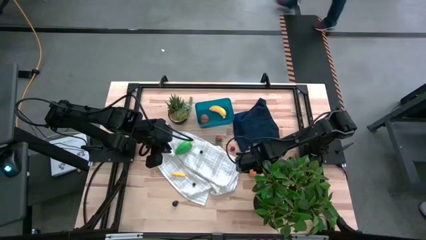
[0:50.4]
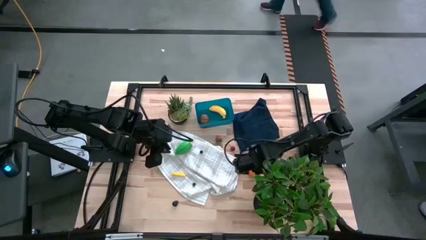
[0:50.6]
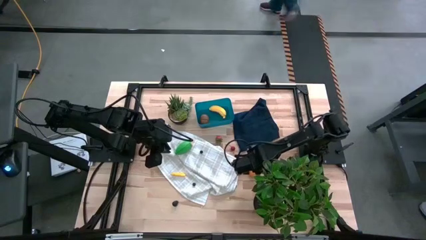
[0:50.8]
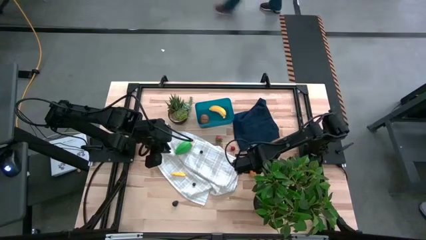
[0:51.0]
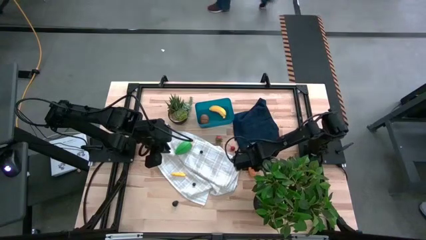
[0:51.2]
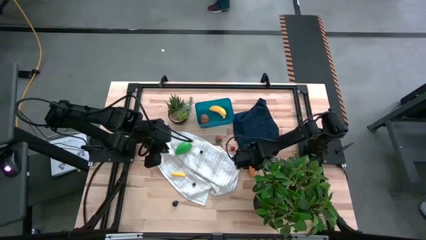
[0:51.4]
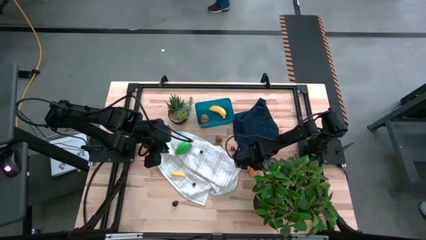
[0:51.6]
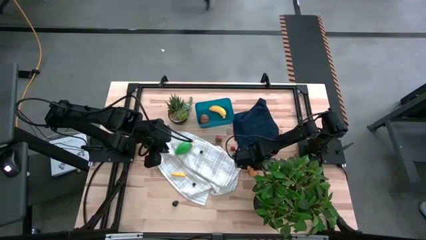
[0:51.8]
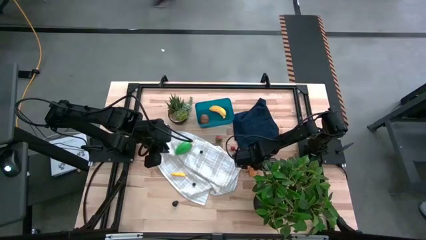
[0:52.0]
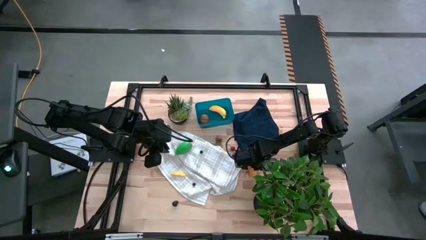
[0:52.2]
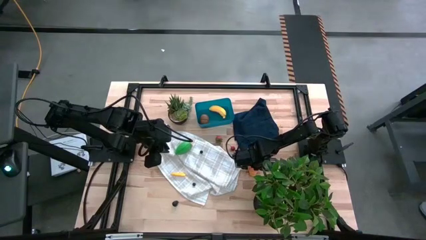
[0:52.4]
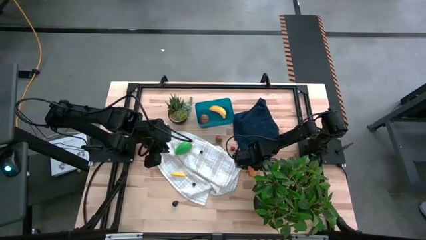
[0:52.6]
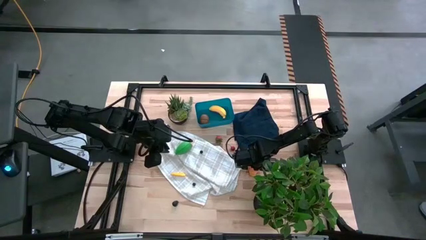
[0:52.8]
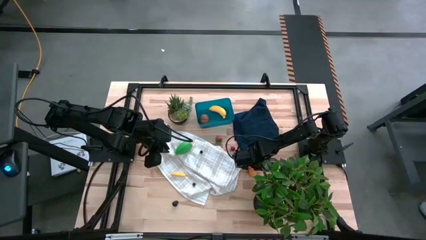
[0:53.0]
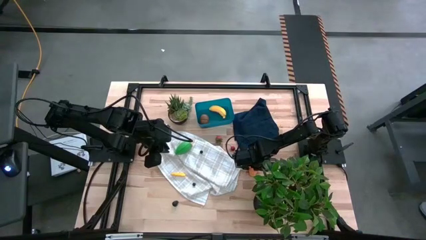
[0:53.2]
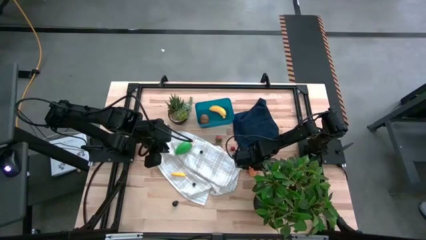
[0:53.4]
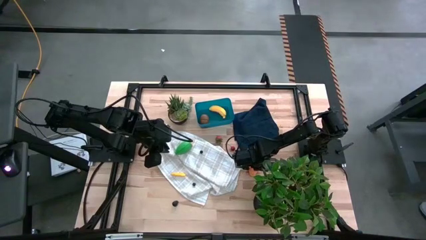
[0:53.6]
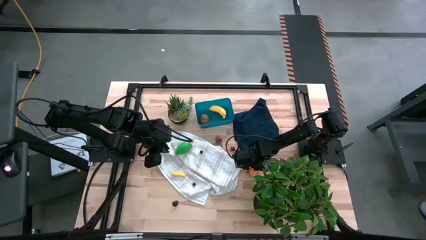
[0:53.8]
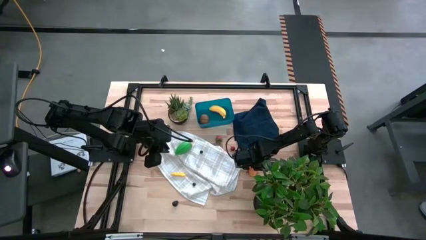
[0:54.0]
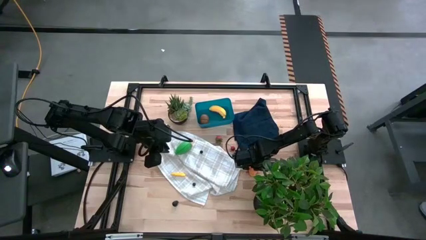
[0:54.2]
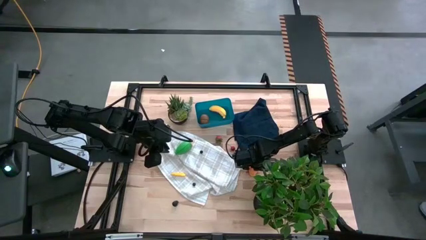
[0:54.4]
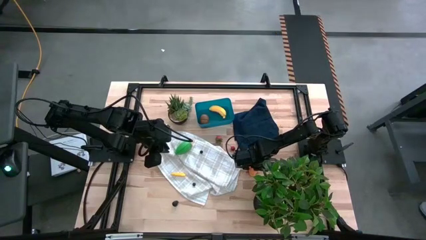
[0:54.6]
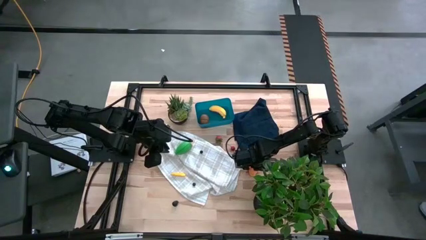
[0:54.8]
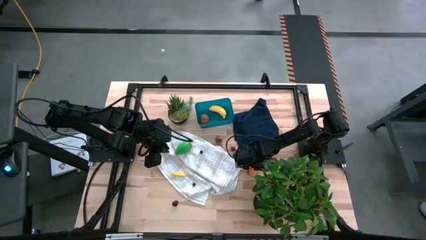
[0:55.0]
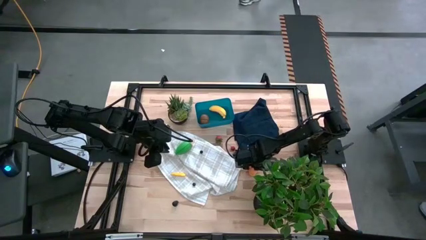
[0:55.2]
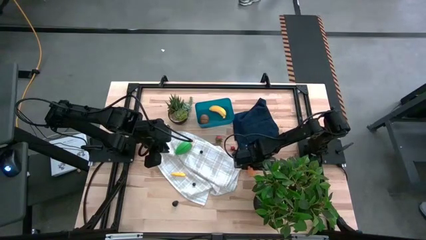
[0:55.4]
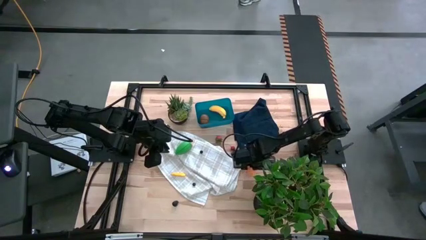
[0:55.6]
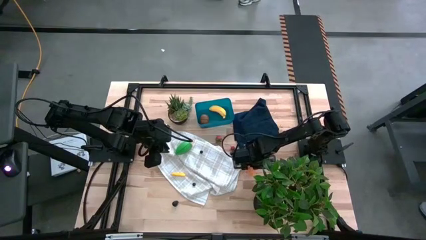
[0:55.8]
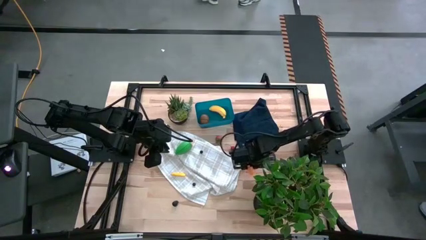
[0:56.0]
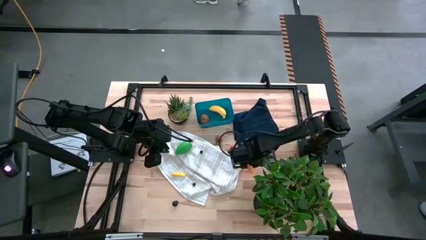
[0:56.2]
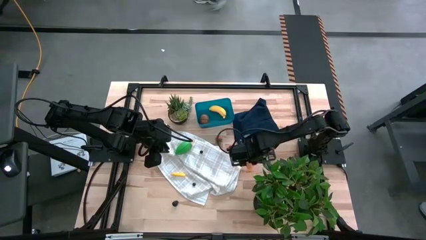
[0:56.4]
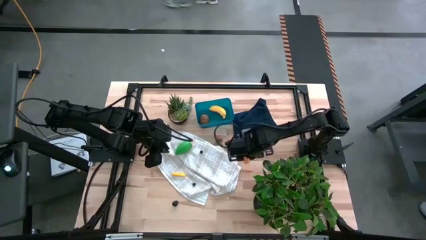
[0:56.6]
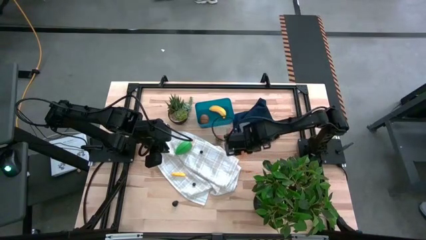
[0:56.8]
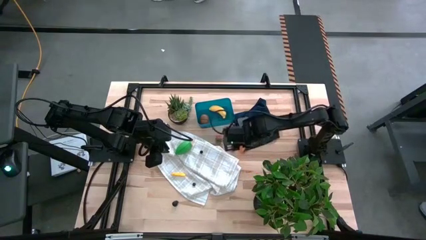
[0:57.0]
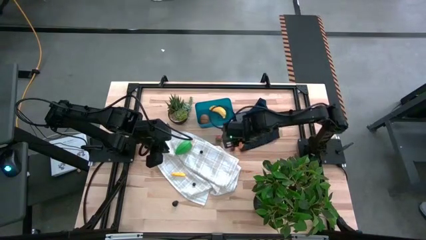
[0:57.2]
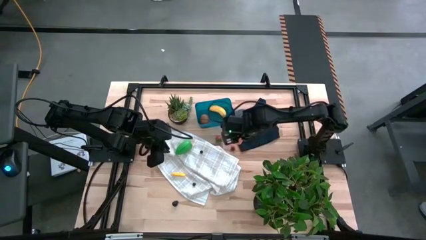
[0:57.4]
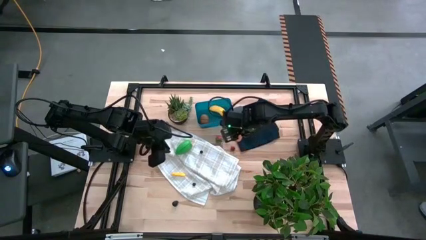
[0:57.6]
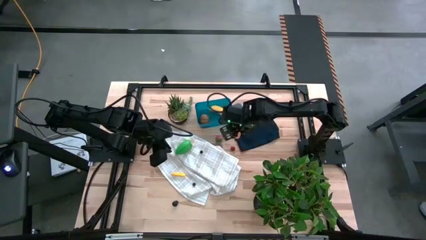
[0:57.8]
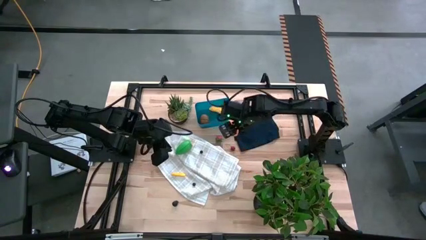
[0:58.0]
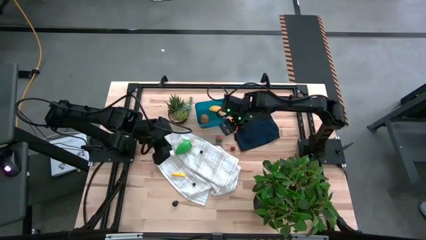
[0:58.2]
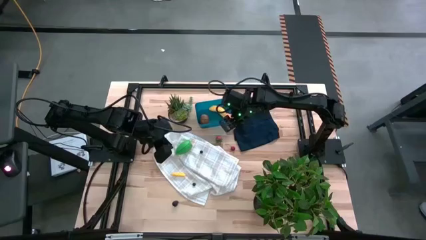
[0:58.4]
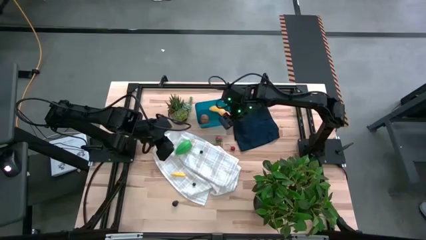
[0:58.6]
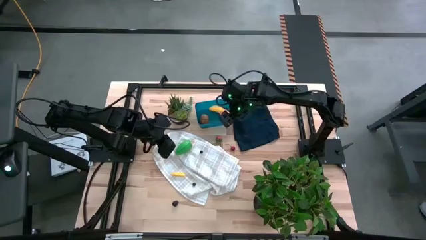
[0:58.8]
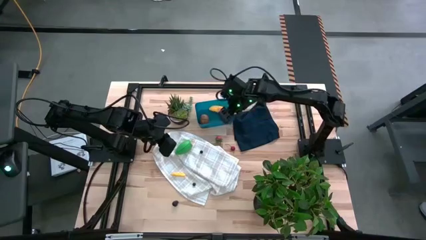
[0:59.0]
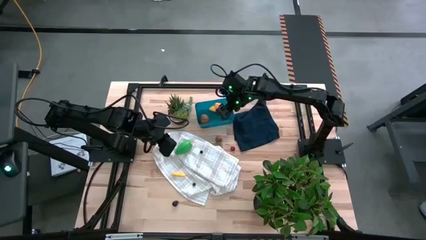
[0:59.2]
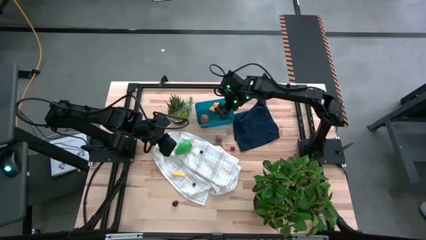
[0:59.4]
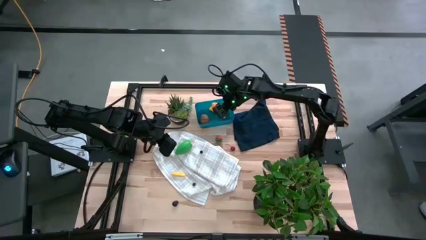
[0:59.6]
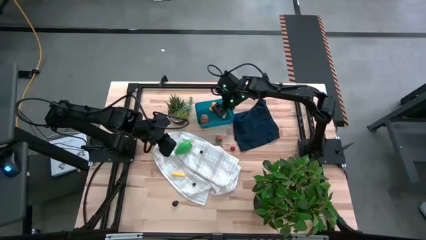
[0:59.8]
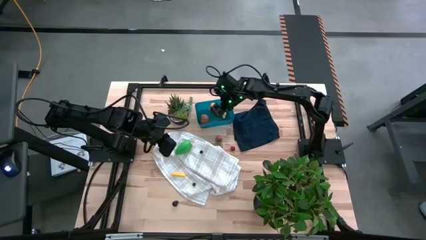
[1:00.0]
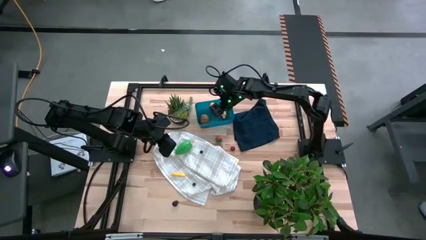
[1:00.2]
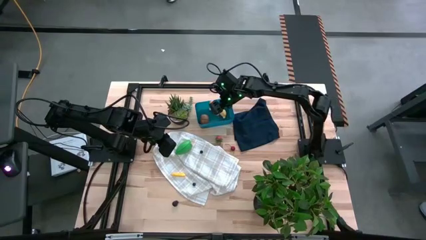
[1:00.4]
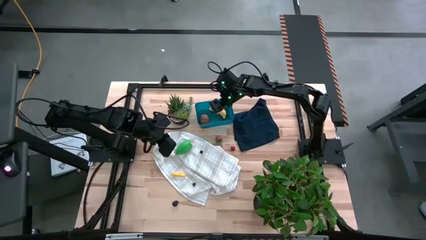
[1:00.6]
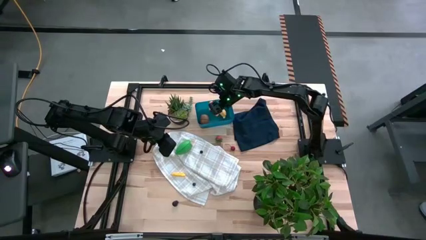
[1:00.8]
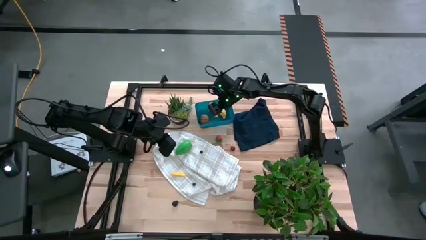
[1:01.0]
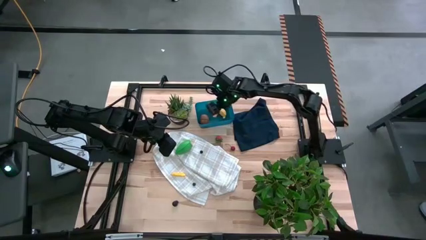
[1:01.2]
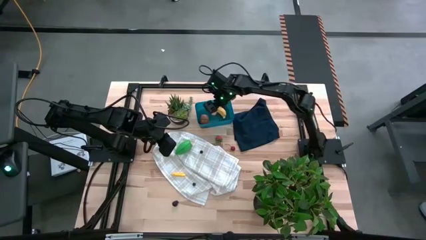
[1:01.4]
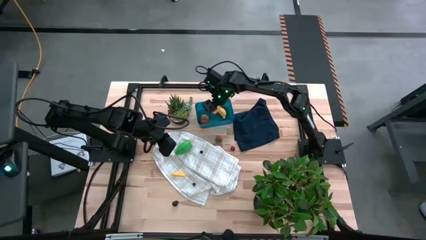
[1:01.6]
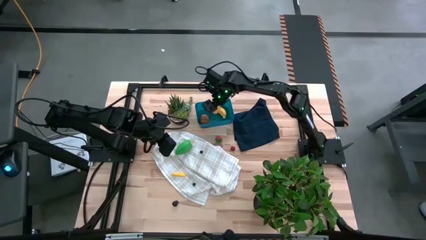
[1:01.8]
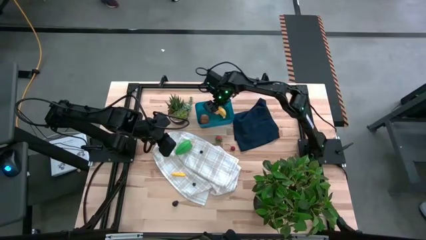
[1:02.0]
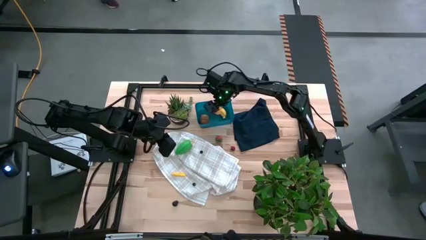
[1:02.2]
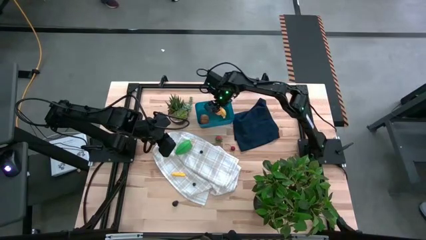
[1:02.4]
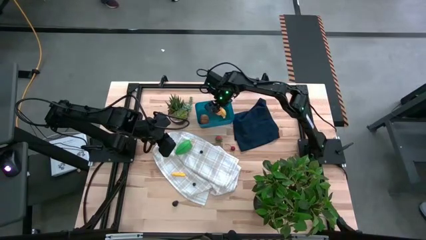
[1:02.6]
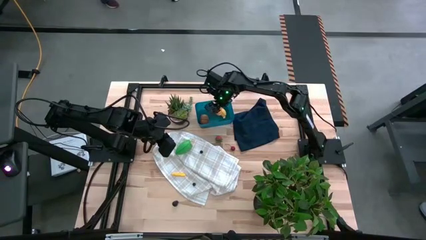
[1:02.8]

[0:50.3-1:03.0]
Task: Pick and placing Produce into tupperware
Put the croissant into the blue bin

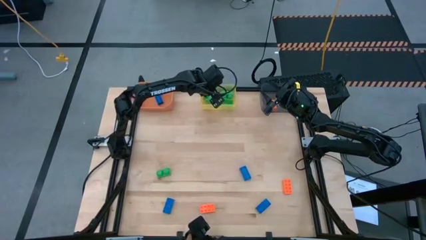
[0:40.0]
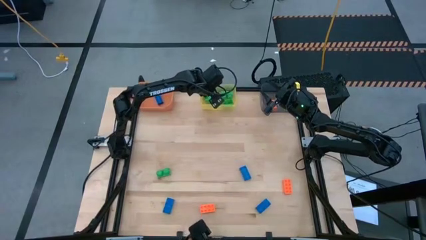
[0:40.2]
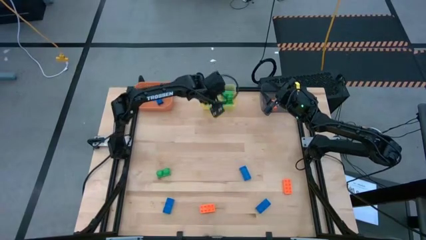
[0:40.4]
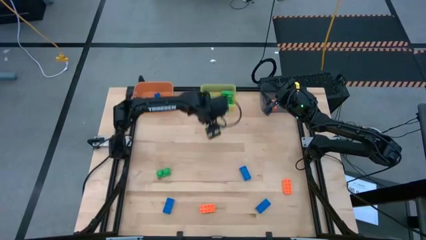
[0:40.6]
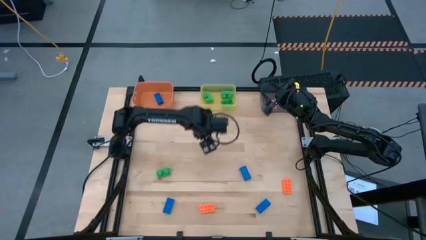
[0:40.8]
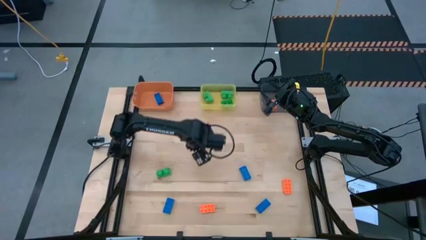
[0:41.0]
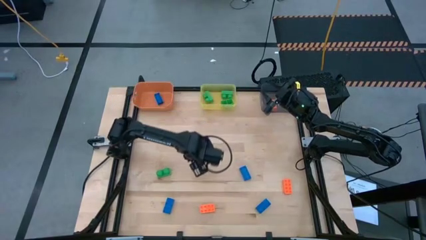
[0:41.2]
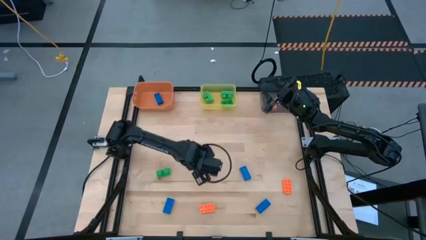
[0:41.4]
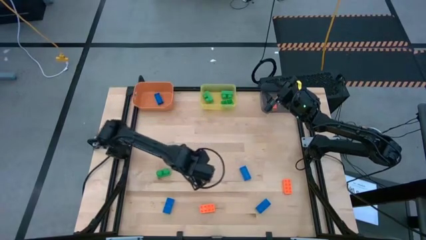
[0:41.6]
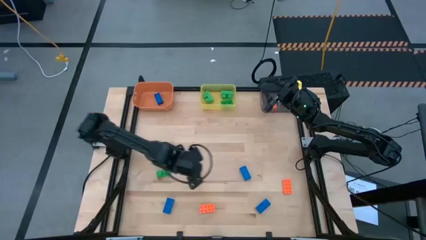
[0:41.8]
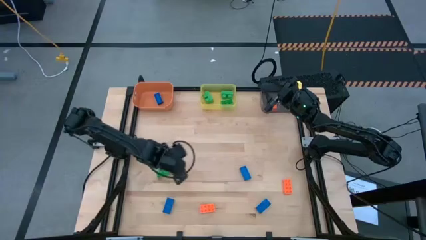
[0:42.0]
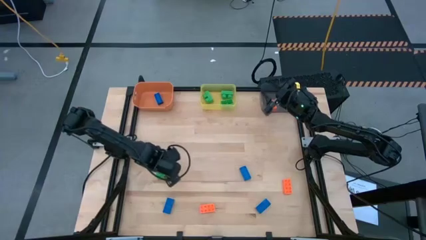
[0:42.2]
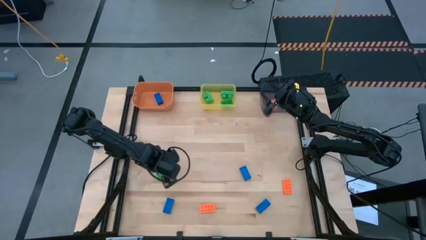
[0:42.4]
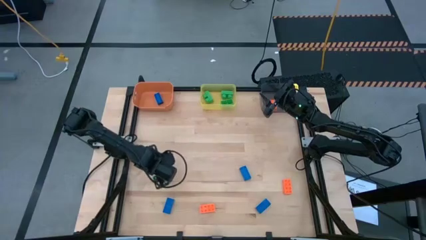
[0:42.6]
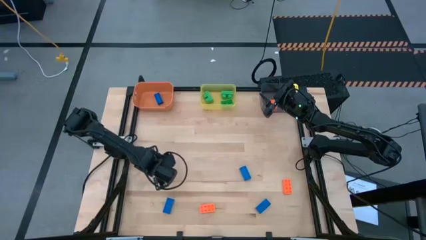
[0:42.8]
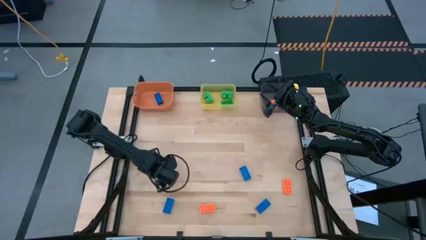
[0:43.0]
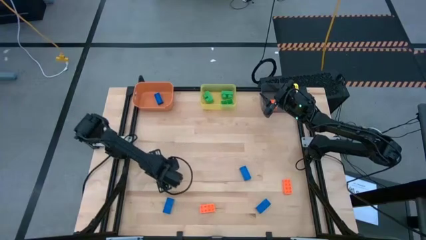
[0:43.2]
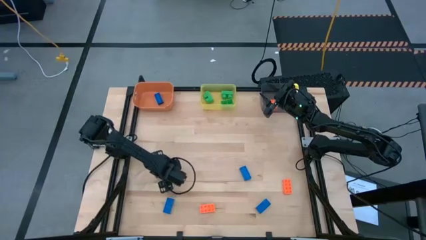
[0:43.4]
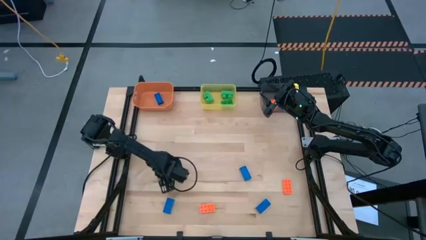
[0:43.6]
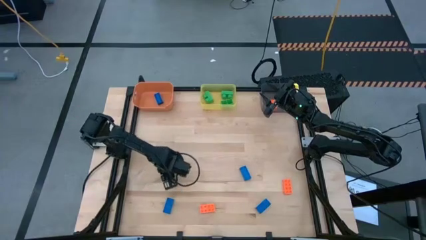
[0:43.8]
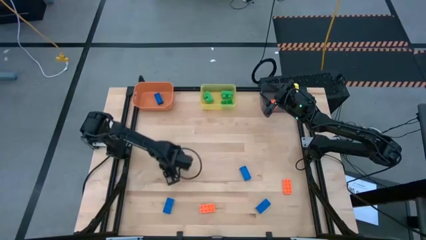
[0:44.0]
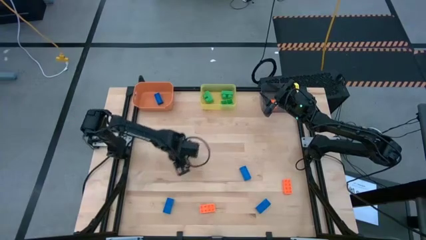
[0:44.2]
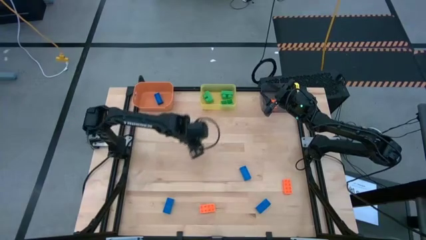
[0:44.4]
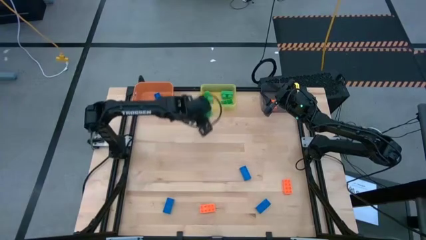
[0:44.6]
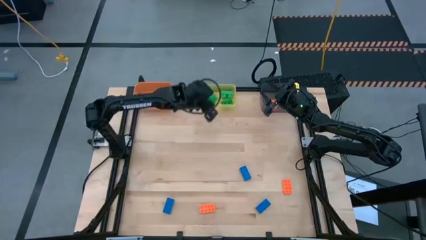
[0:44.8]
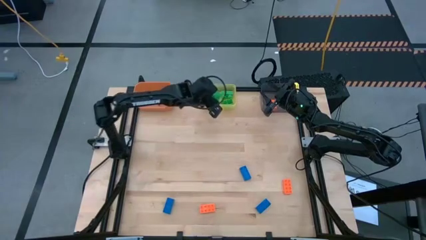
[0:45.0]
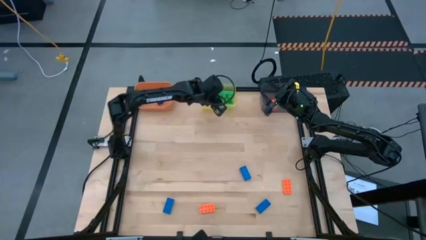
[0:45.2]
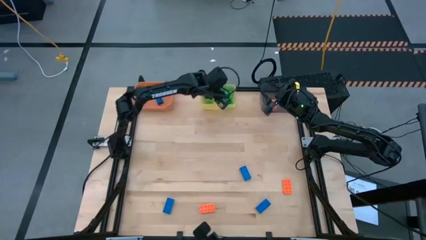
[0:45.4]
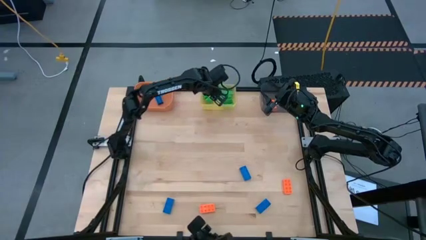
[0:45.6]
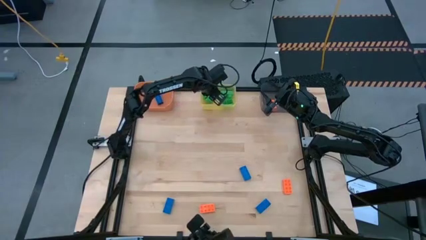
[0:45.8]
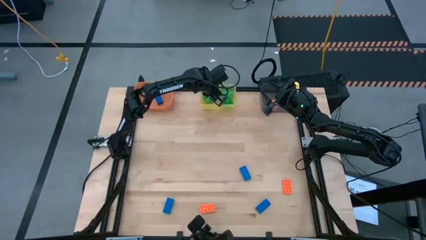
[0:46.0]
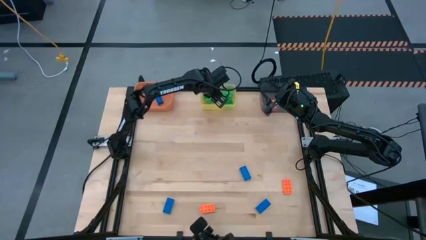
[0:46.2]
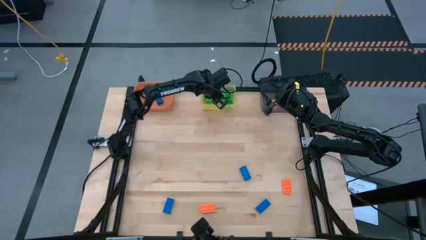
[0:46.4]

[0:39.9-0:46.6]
Task: Sort & place blocks by color
Put the green game piece into the yellow bin
